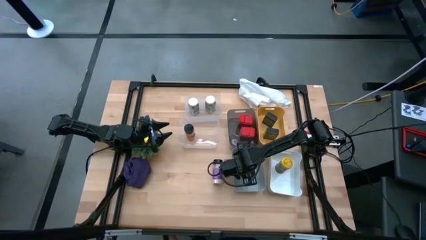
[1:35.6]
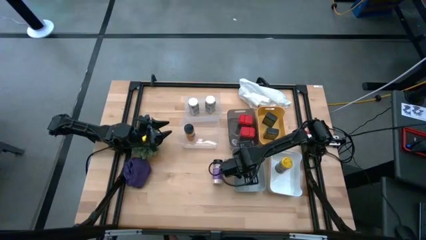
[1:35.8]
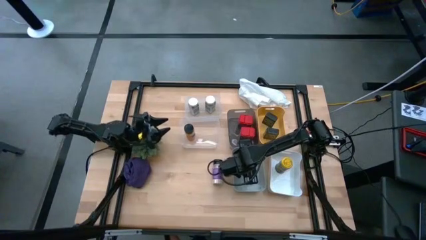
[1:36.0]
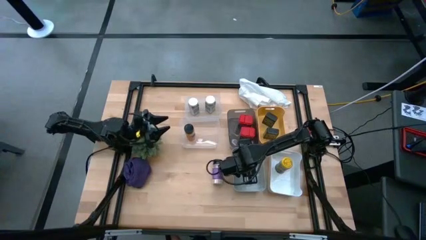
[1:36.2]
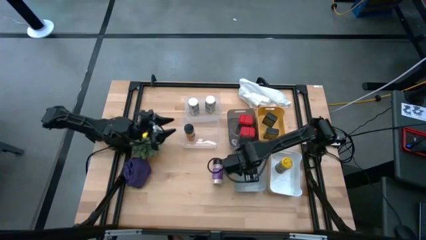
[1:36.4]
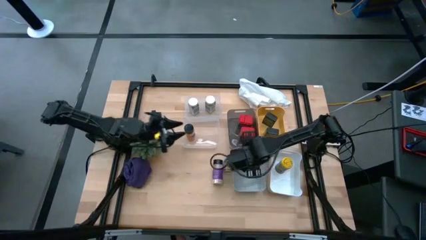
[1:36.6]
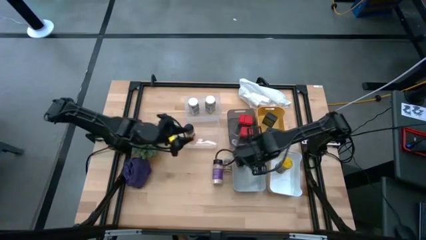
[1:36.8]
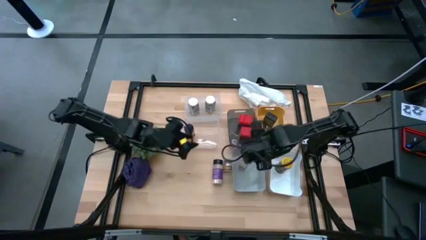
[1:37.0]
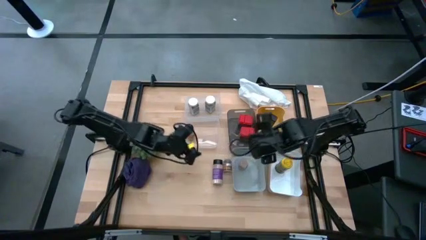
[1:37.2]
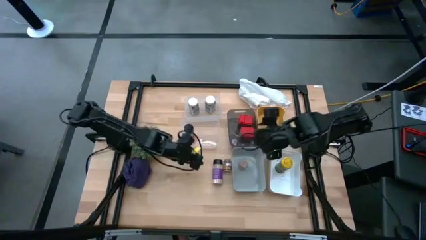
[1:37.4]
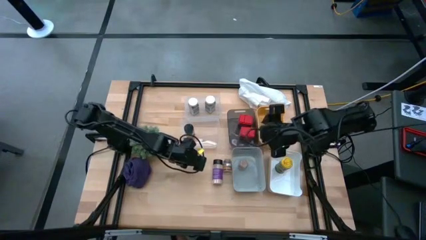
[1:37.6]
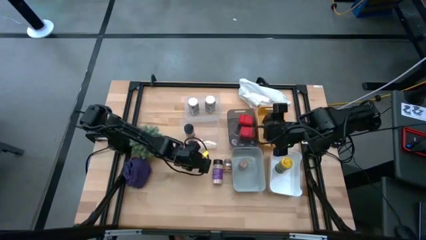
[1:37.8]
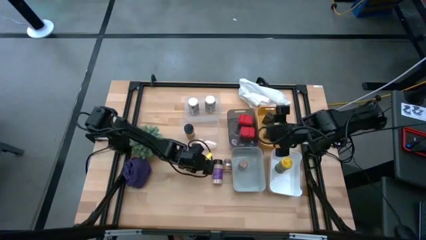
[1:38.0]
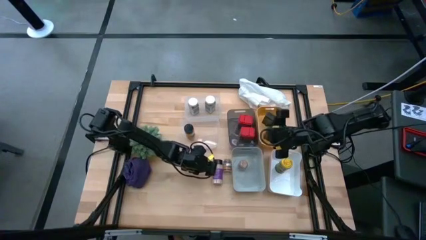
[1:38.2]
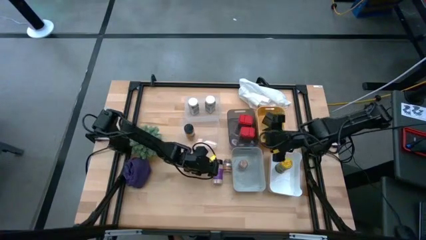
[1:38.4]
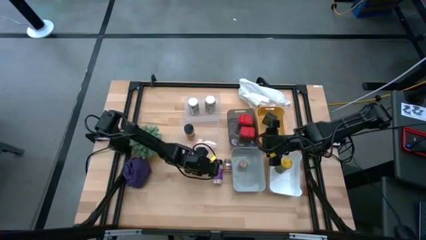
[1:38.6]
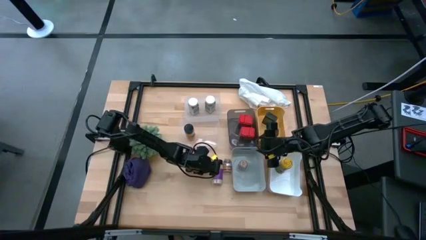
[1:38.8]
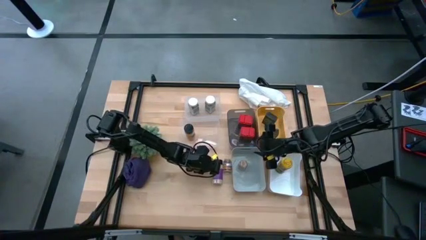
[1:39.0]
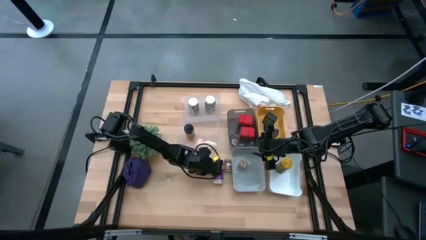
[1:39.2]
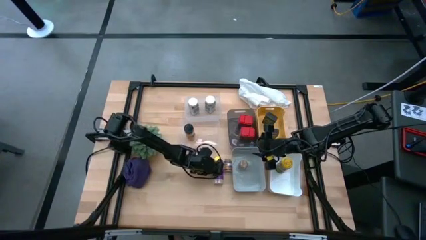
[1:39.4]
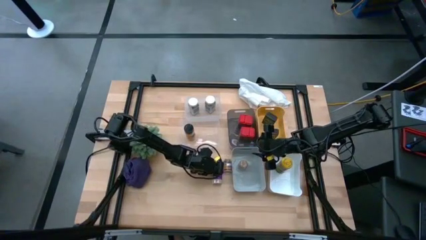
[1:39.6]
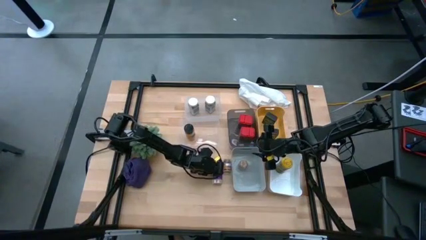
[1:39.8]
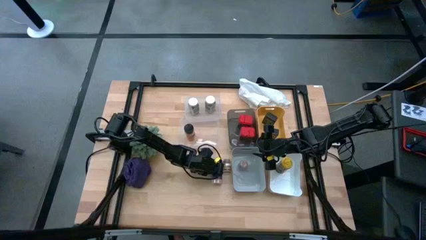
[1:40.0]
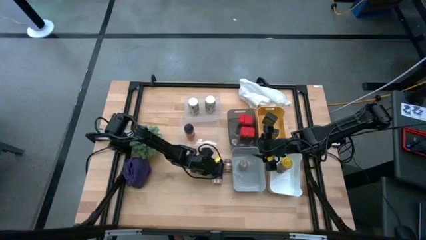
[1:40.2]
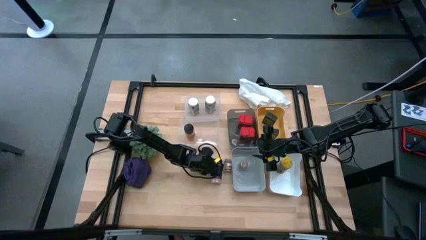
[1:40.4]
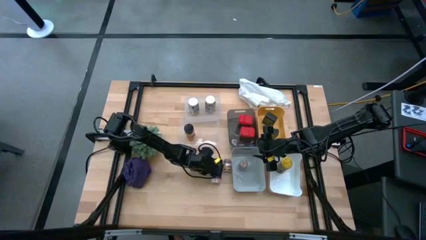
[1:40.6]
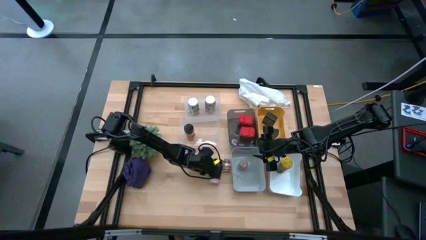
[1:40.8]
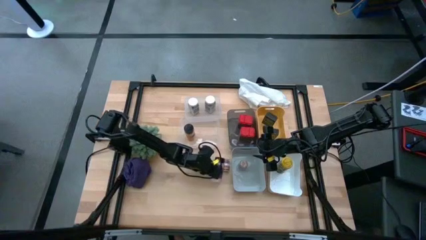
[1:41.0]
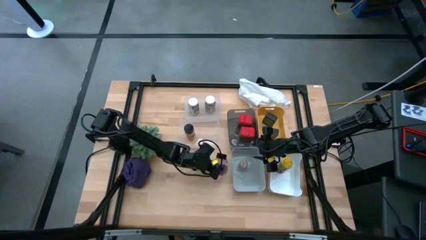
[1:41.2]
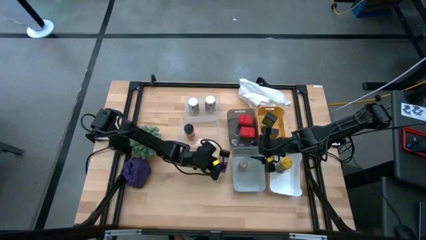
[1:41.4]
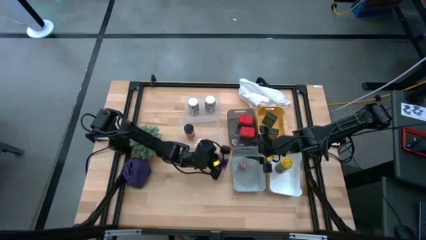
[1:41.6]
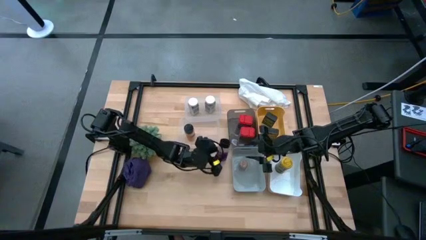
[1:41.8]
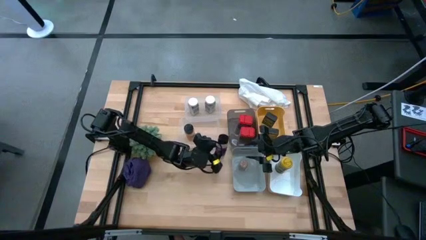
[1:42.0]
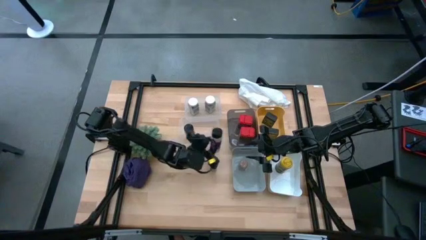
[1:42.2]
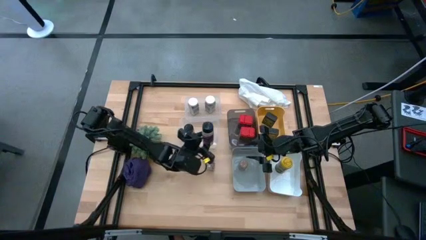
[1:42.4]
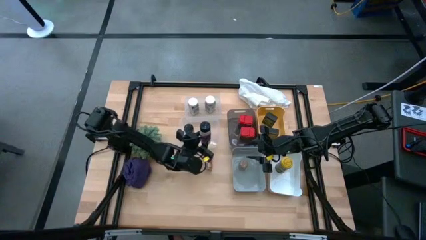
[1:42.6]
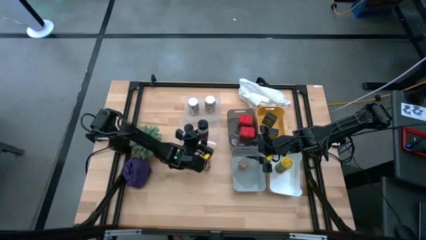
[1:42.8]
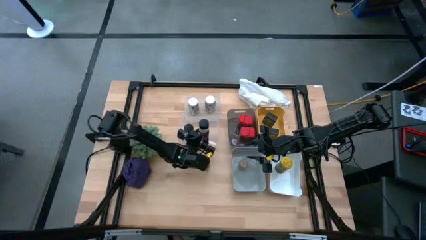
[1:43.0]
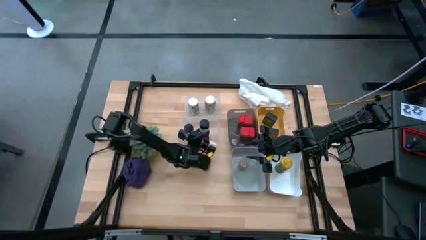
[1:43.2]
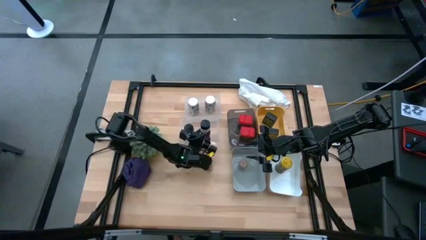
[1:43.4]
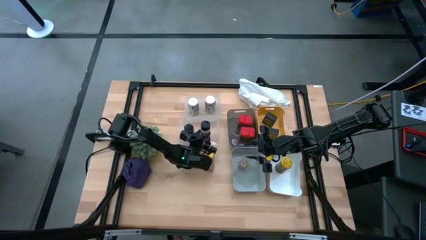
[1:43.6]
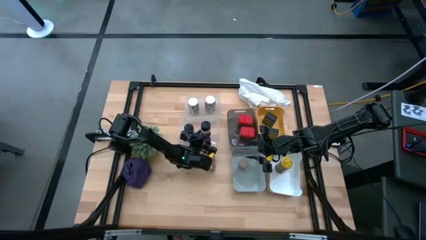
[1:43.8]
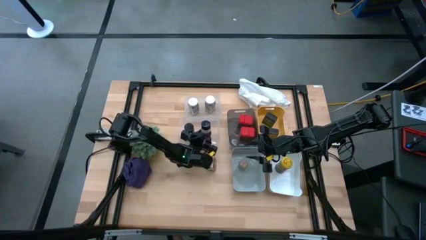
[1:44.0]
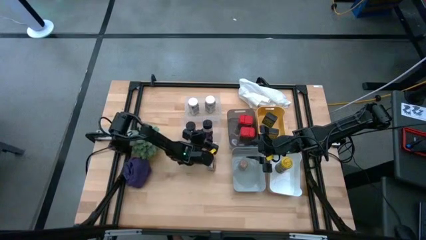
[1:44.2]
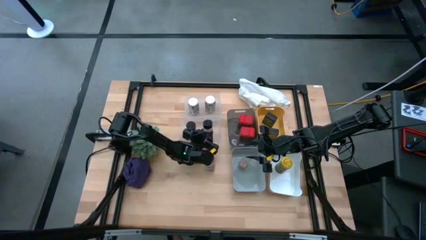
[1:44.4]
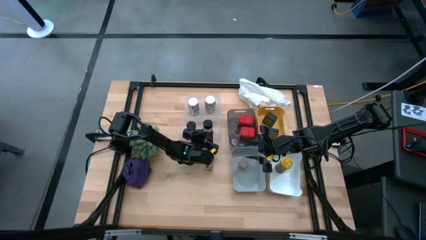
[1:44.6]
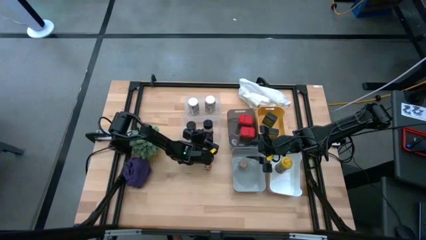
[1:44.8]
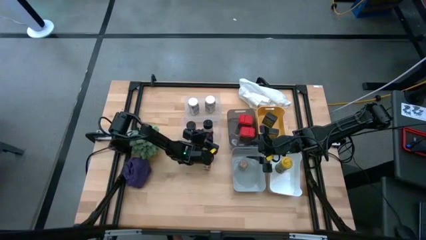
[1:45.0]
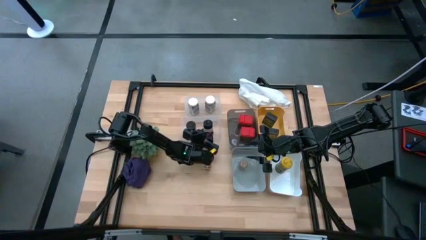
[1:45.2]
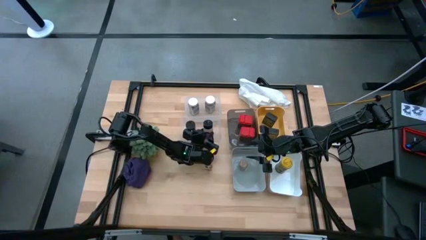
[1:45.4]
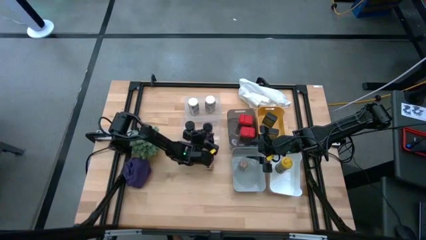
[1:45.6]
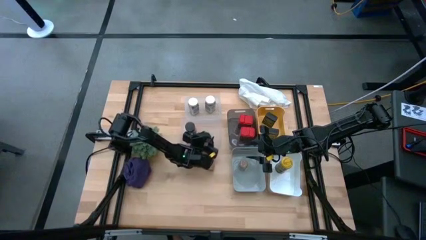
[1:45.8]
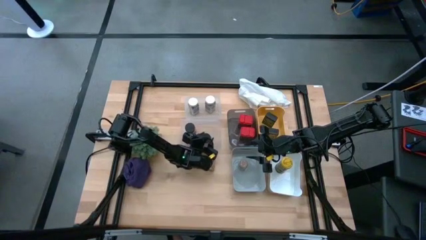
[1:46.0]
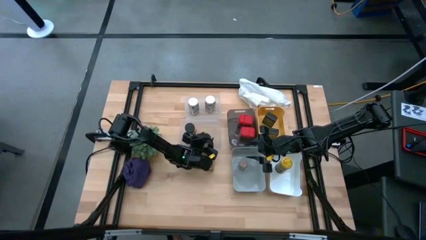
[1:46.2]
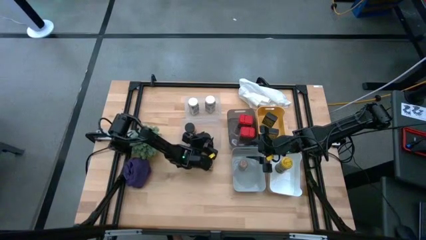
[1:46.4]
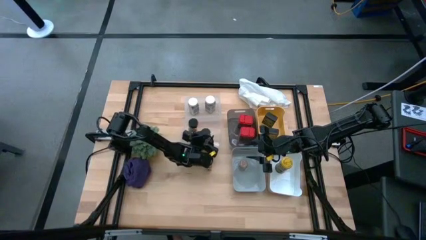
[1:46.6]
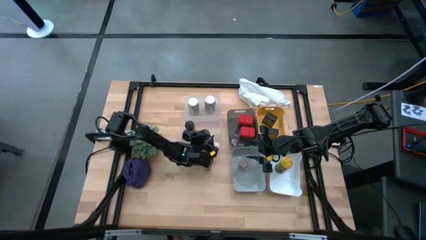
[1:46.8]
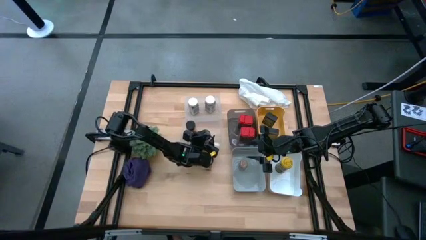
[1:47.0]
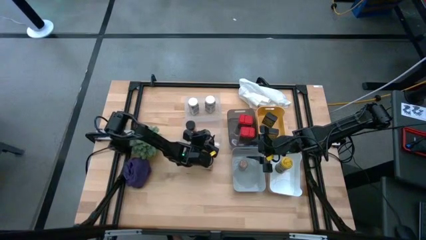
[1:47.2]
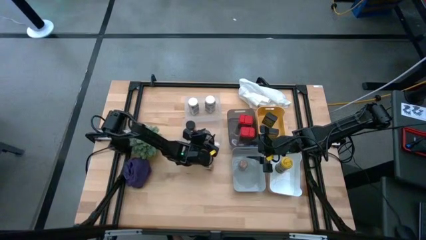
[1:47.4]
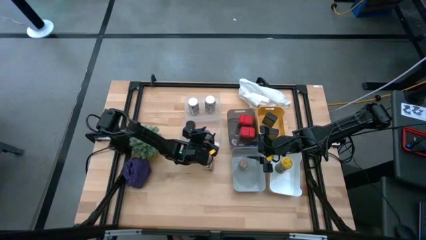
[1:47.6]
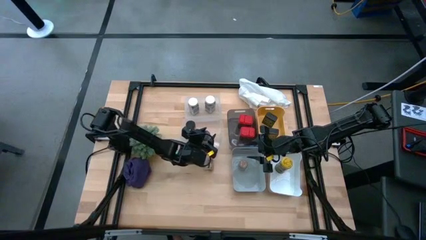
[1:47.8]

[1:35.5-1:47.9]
Task: Sort spices by type
Put the purple seasoning bottle into the bottom transparent bin

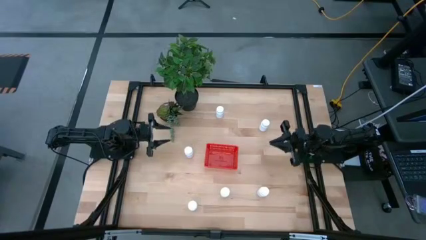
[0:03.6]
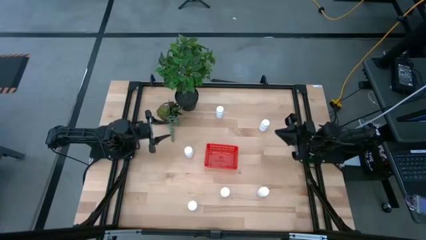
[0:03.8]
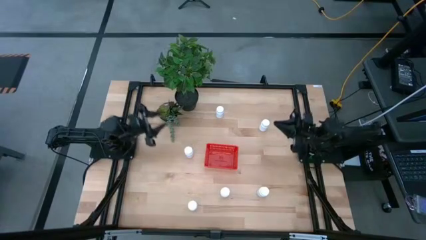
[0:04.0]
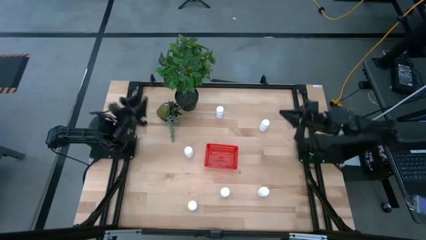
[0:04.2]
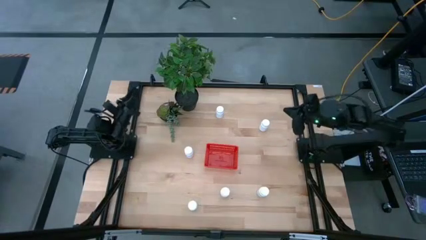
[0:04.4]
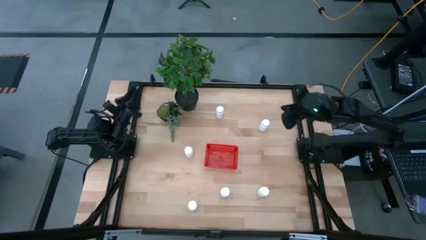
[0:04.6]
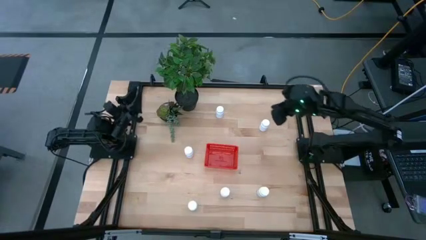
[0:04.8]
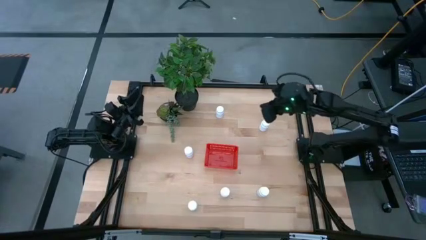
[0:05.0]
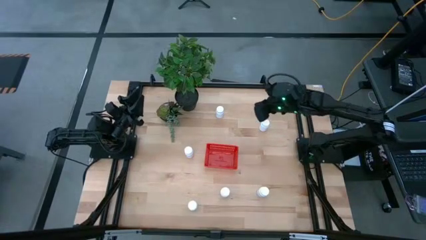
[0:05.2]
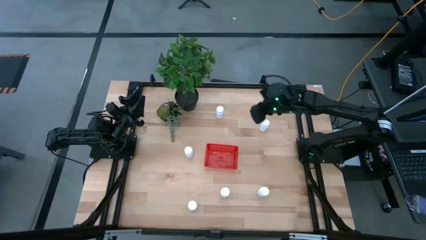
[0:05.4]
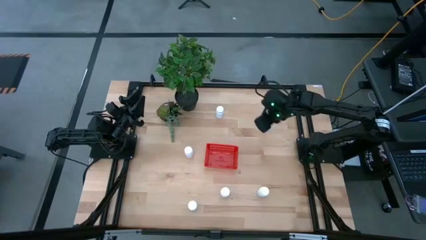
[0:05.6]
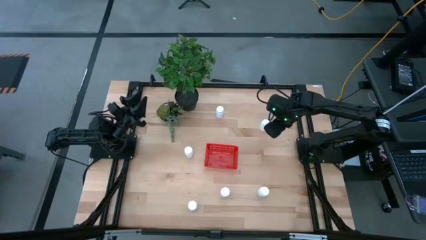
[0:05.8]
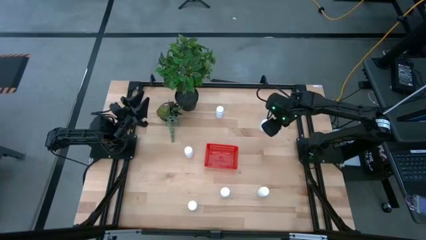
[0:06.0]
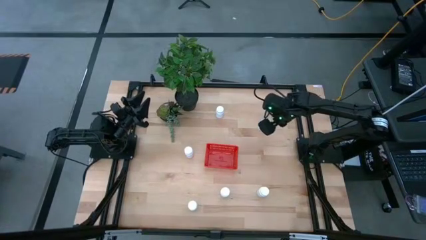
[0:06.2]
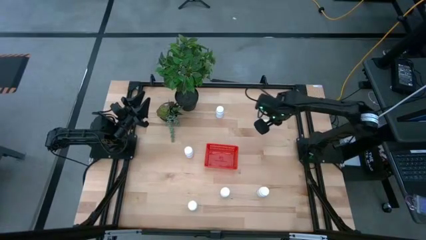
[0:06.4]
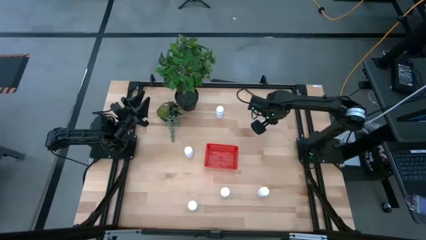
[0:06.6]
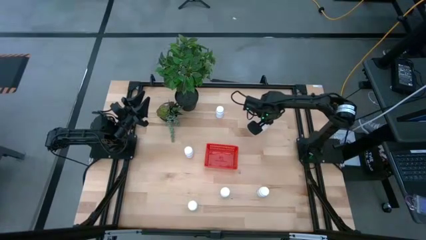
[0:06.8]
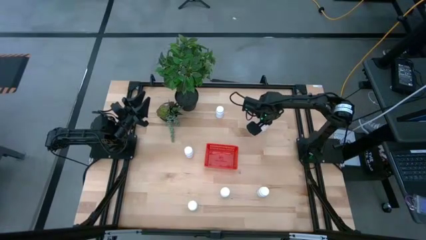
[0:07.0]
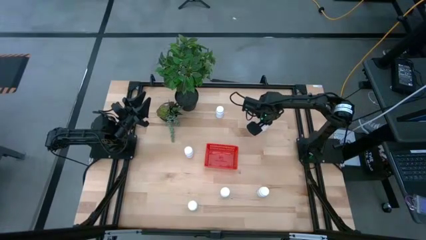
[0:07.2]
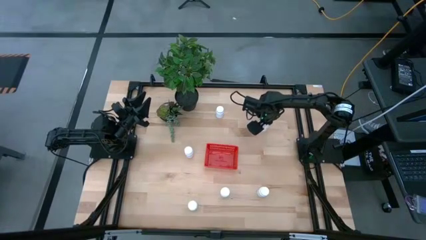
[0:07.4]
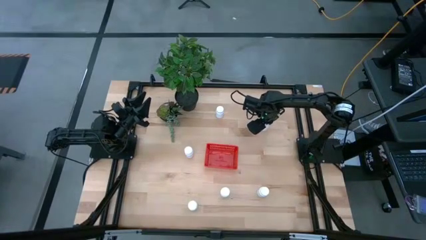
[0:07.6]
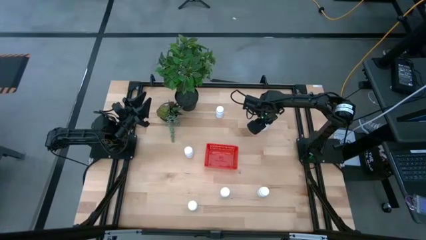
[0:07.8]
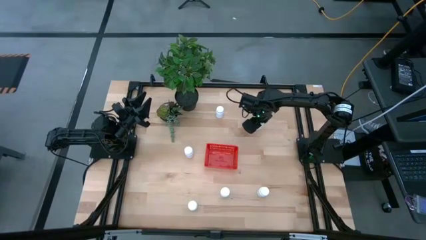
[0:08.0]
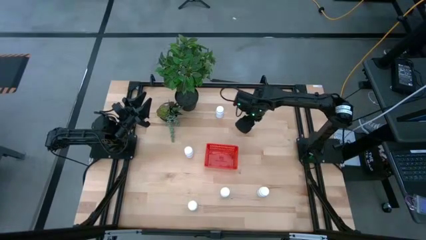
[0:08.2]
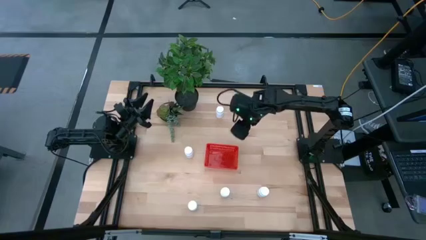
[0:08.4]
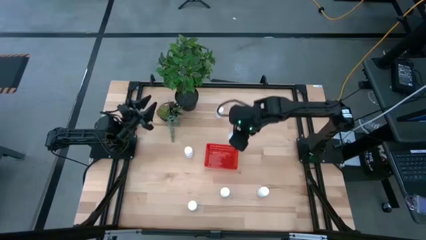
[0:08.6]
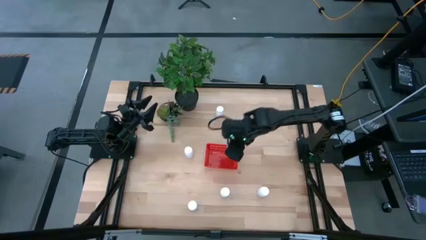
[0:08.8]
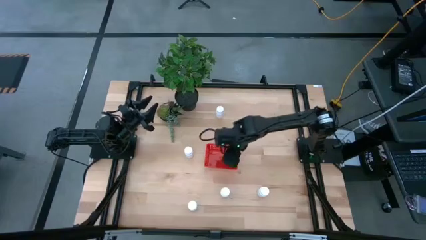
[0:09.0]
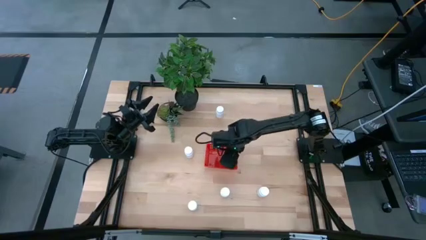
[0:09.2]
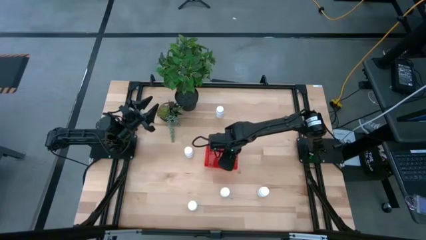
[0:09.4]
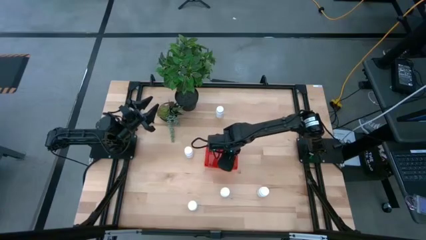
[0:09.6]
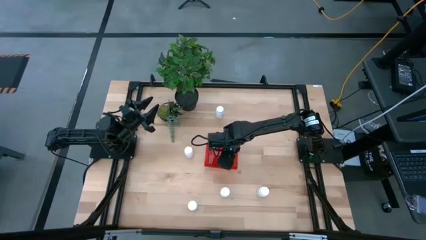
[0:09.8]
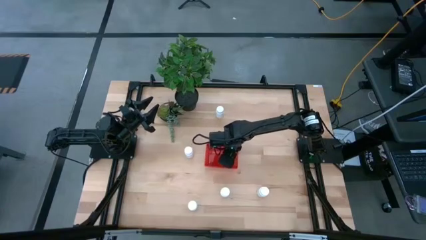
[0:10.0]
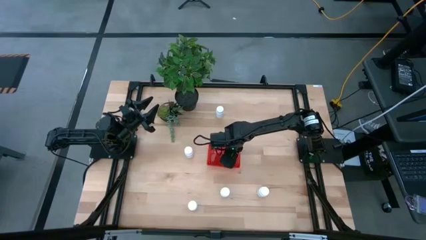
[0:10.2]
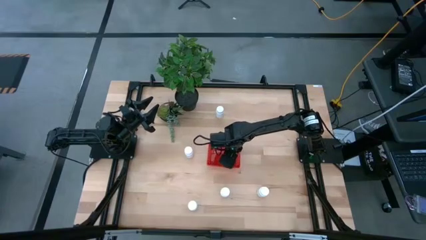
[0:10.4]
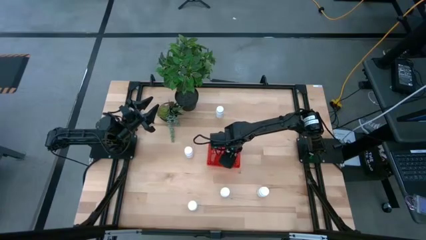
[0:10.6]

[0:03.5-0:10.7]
Task: Pick and place pill bottles into a basket
Put the white pill bottle into the red bin
